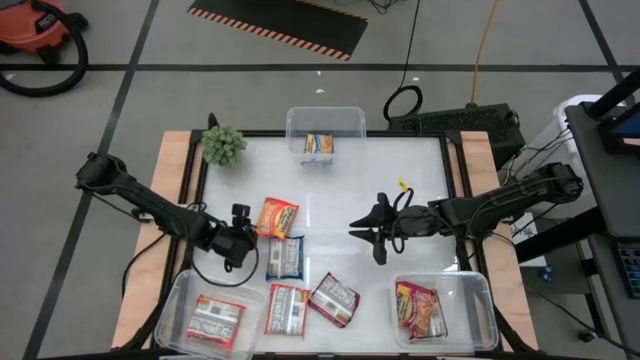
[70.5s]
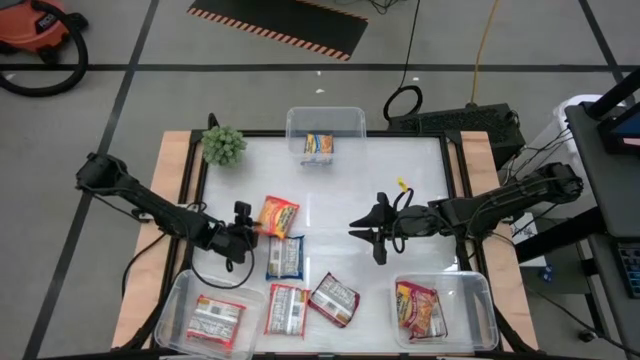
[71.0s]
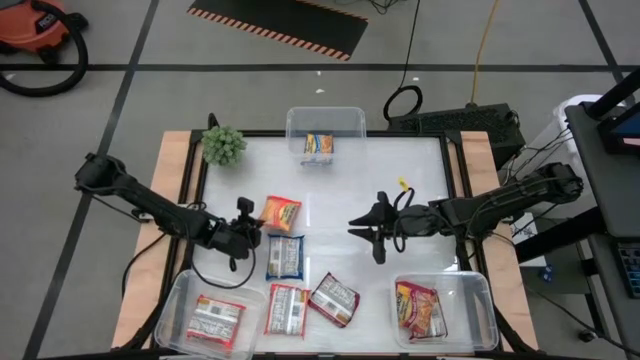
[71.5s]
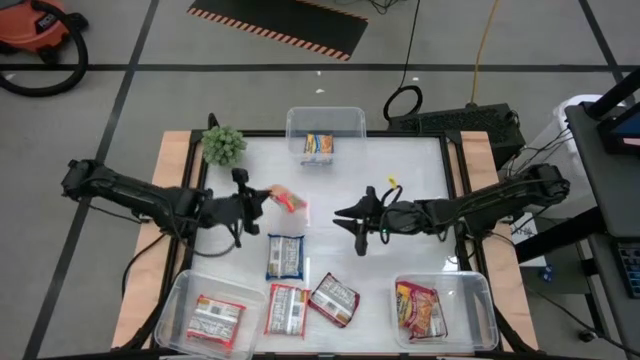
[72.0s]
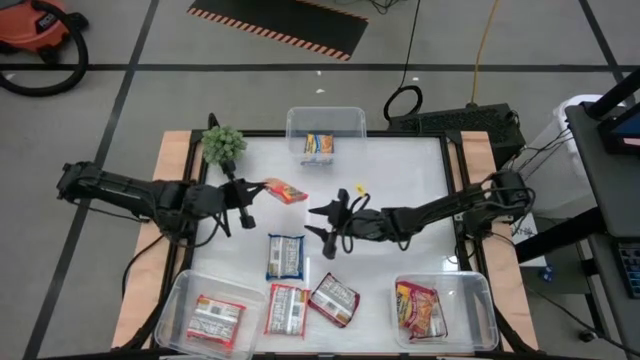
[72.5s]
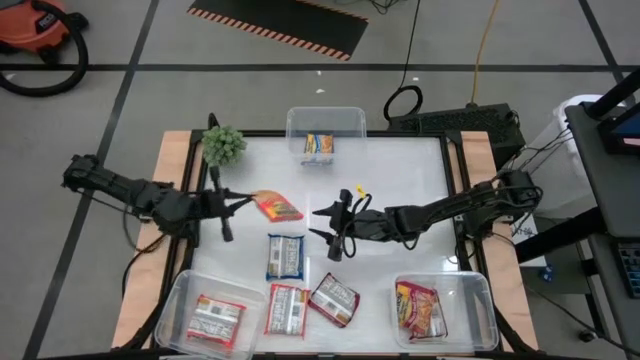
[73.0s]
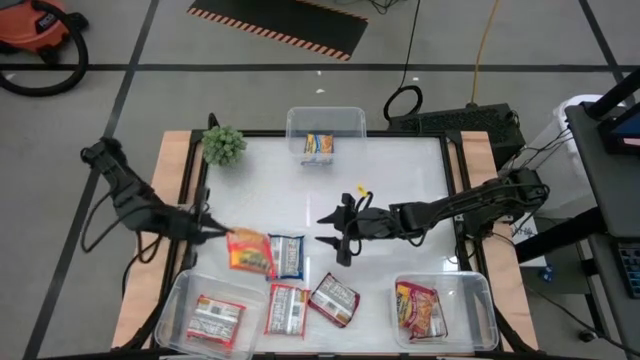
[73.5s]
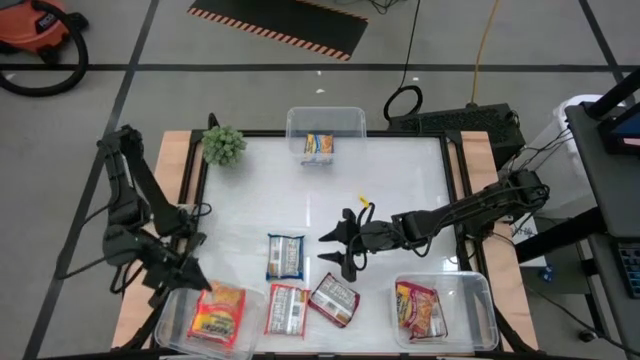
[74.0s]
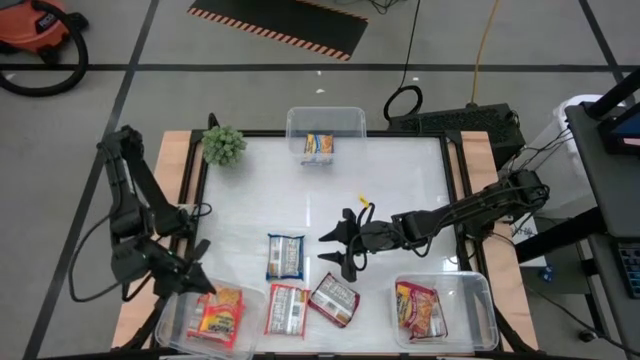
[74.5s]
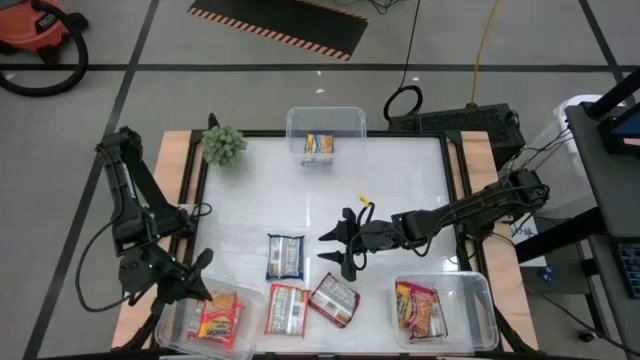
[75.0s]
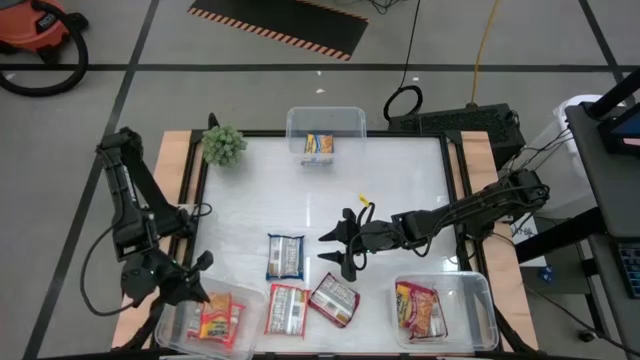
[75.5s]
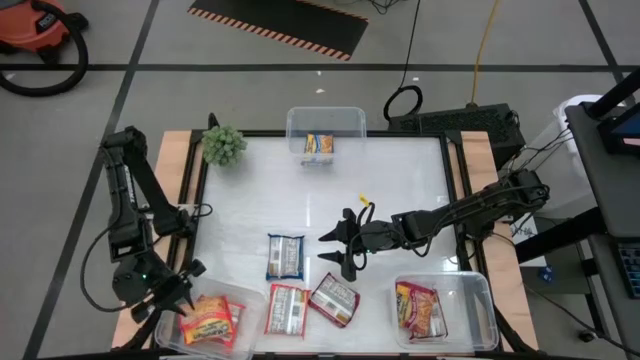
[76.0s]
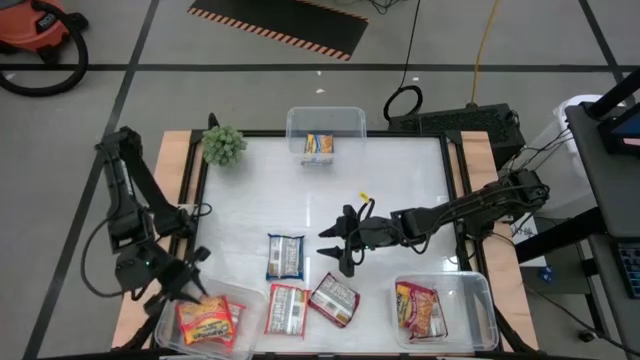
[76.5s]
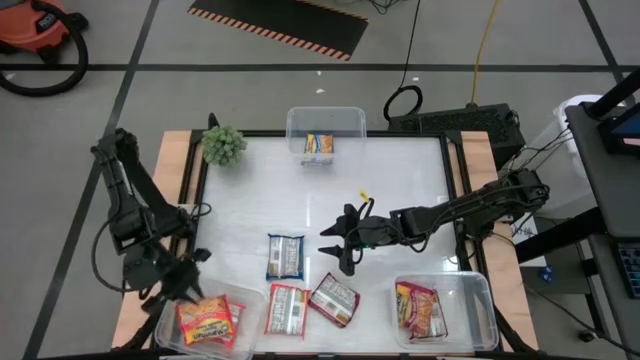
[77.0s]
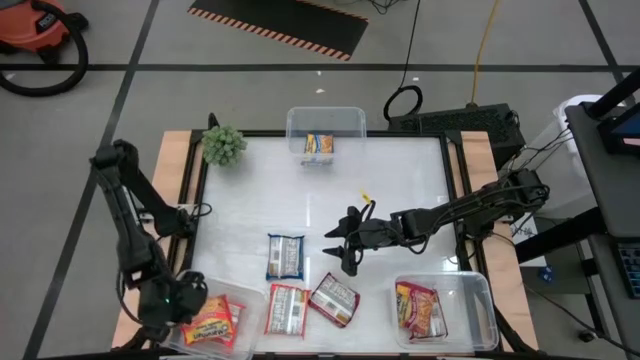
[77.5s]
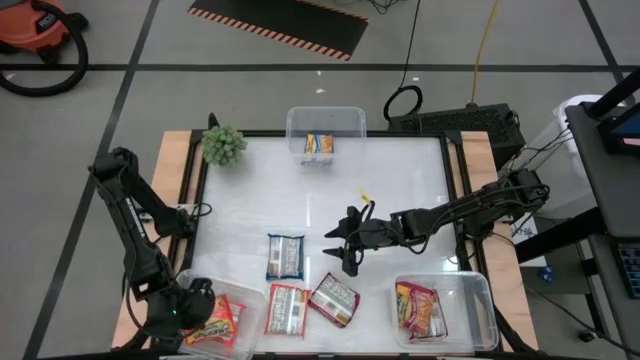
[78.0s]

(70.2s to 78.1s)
Task: Sort Maruchan noodles
Put the top orange noodle pack into the left transparent bin

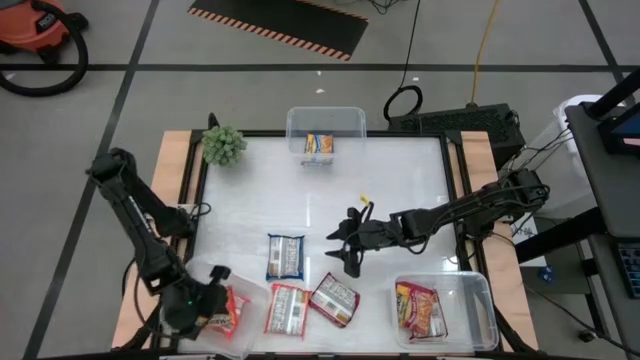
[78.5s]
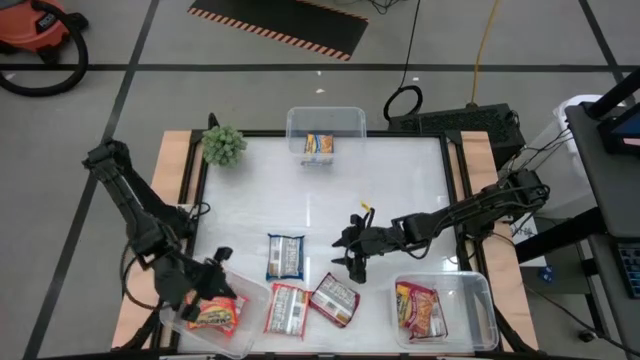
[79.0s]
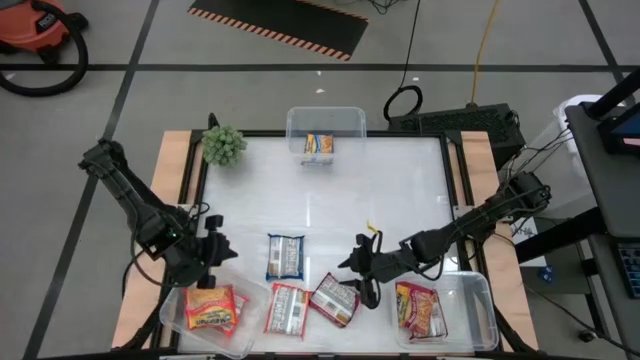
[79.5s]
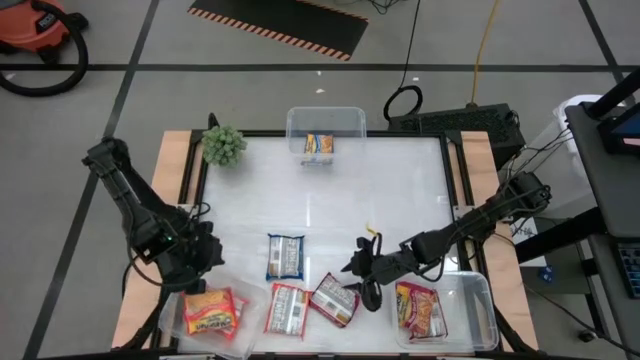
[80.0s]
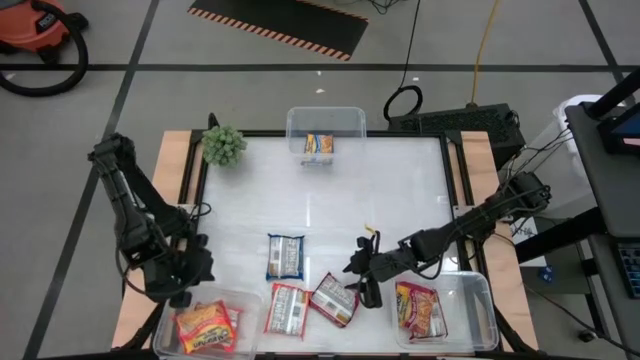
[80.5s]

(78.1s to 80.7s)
Adjust the left transparent bin

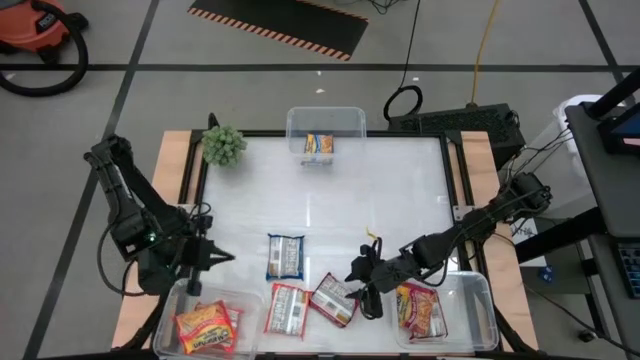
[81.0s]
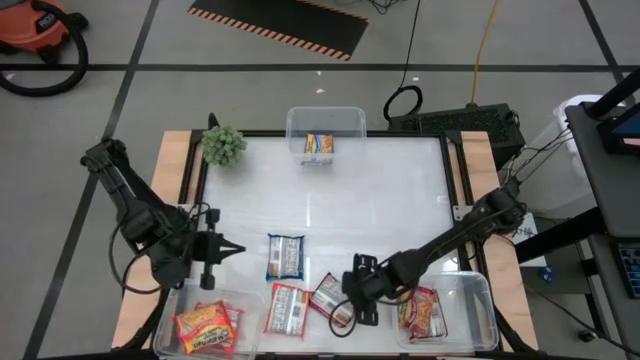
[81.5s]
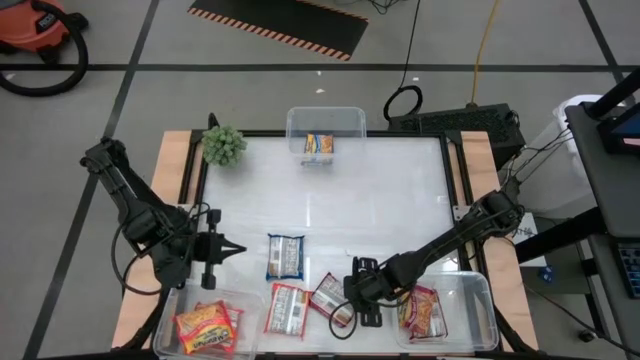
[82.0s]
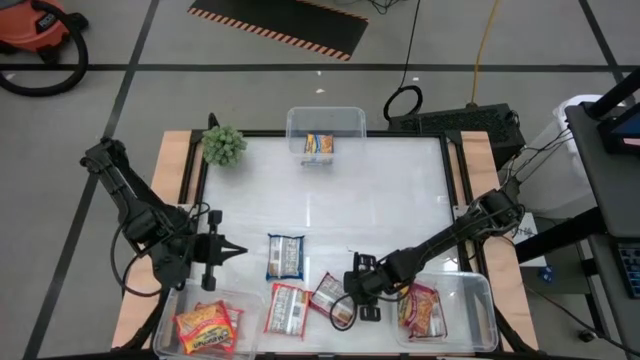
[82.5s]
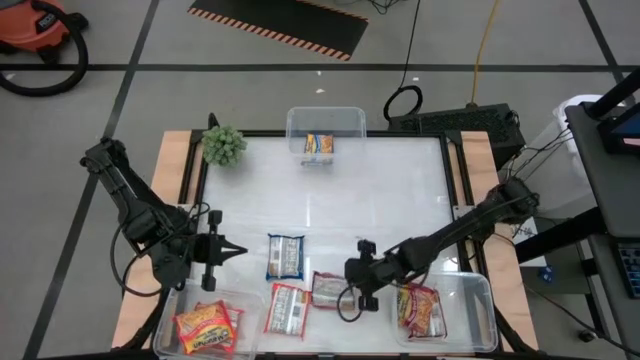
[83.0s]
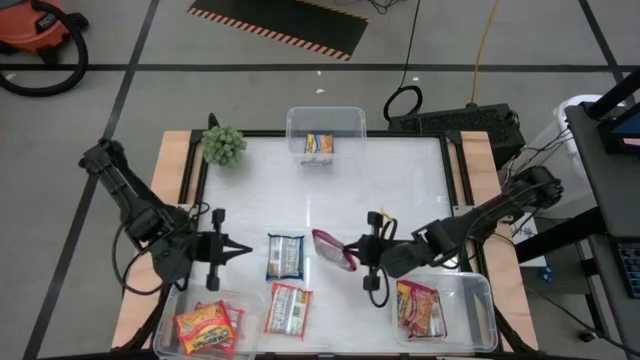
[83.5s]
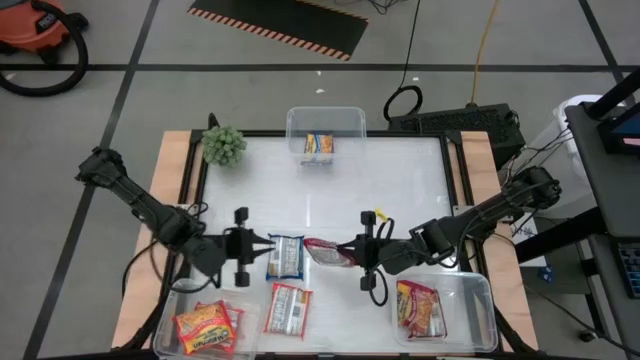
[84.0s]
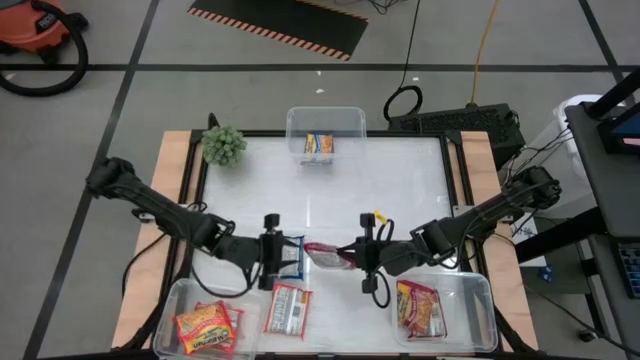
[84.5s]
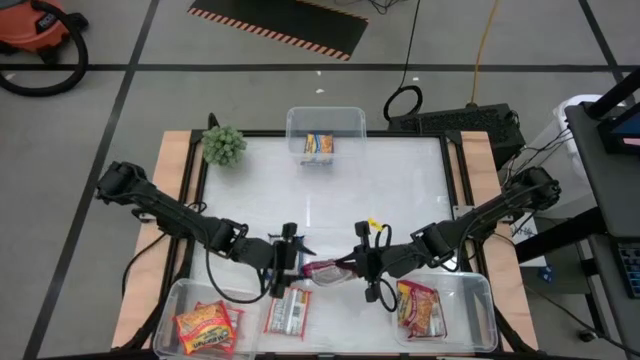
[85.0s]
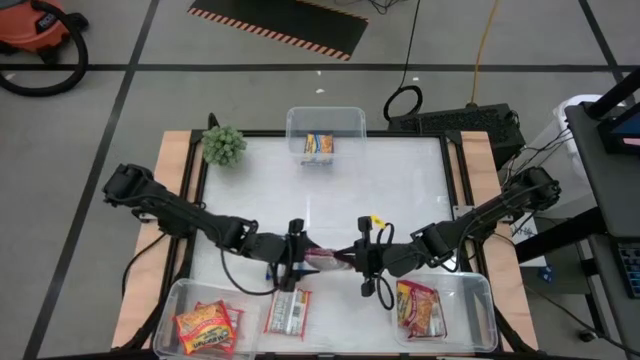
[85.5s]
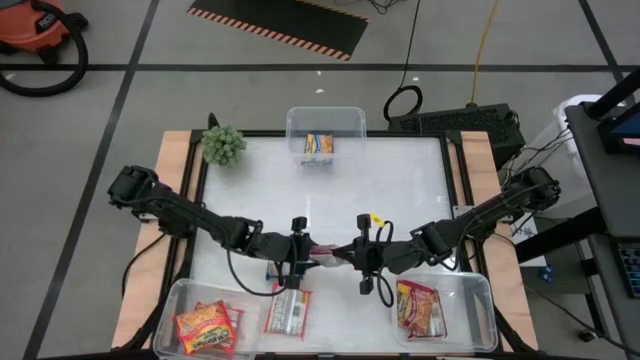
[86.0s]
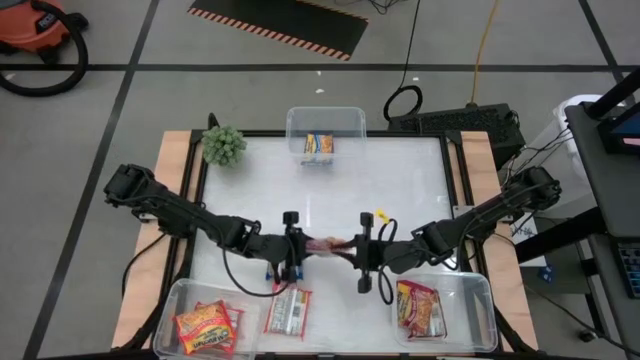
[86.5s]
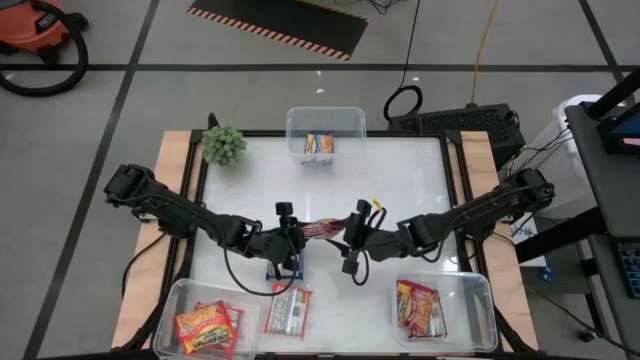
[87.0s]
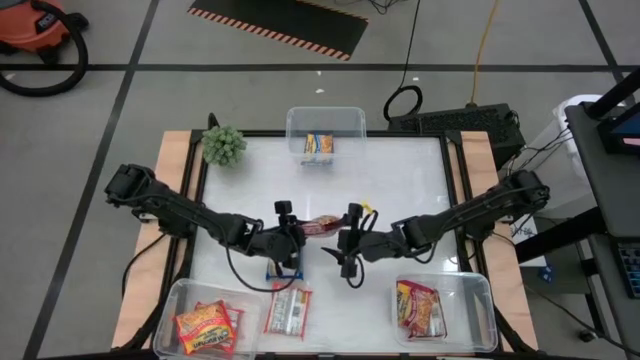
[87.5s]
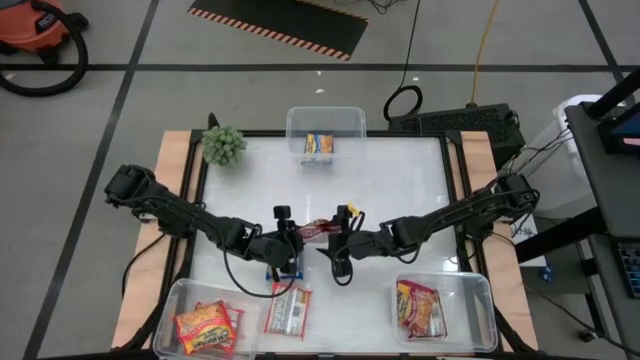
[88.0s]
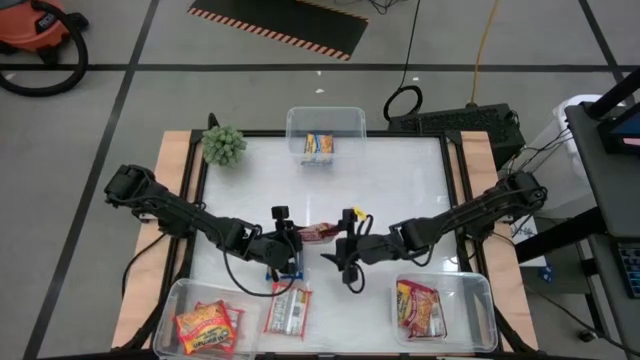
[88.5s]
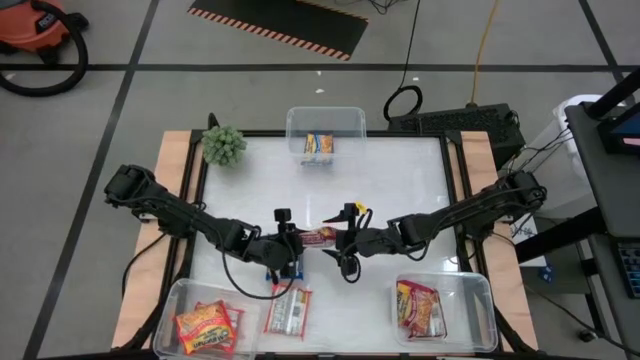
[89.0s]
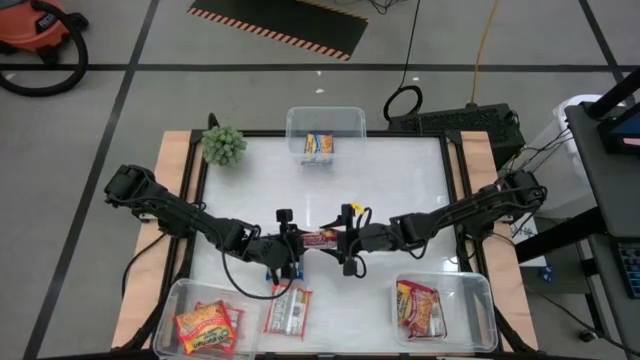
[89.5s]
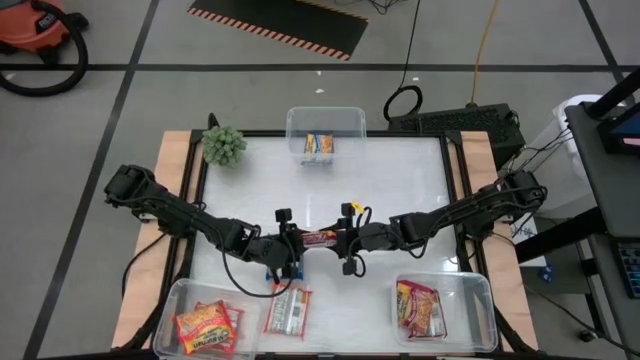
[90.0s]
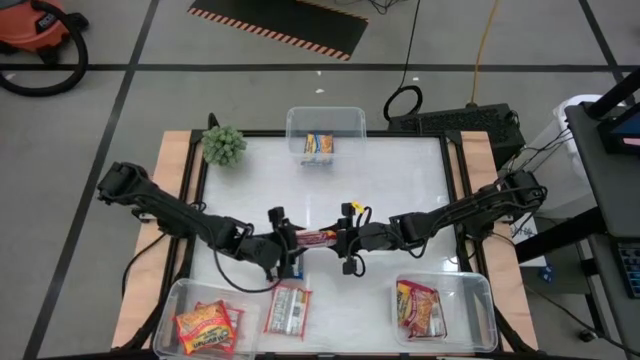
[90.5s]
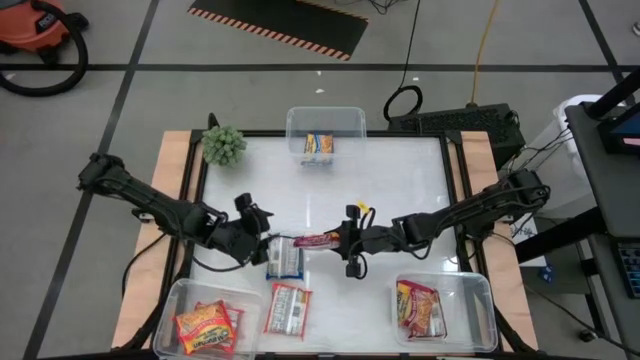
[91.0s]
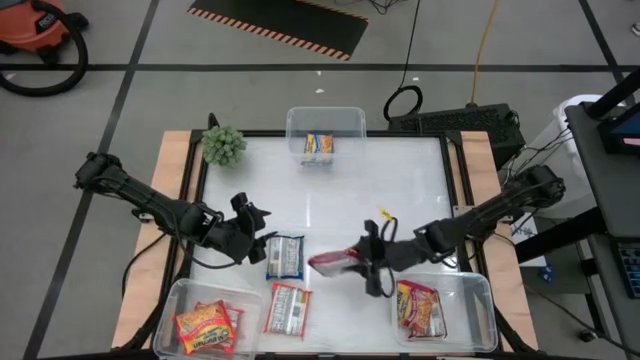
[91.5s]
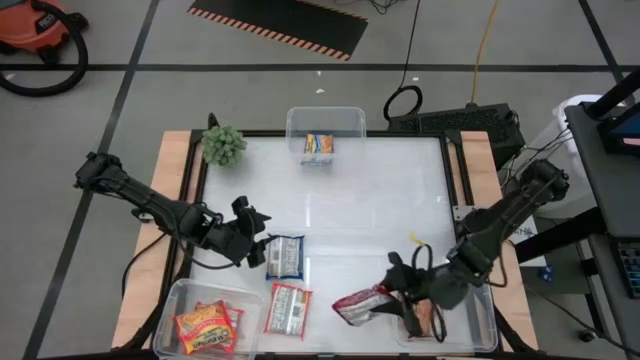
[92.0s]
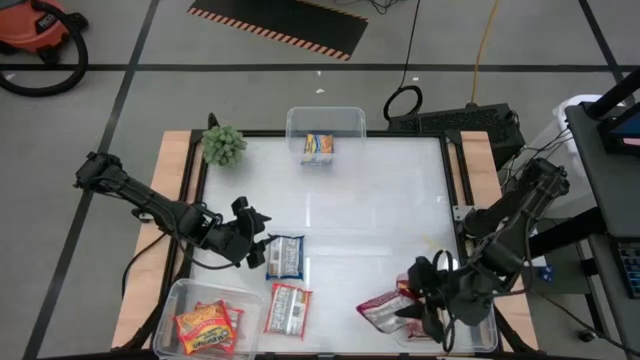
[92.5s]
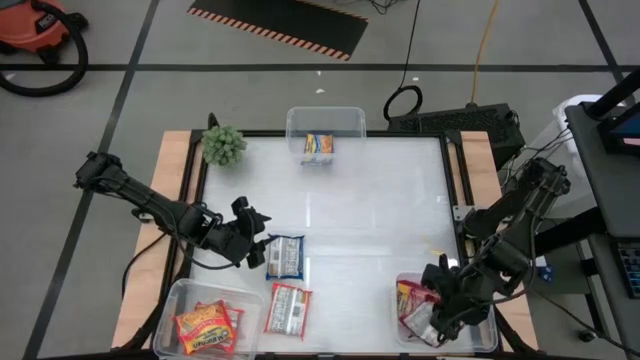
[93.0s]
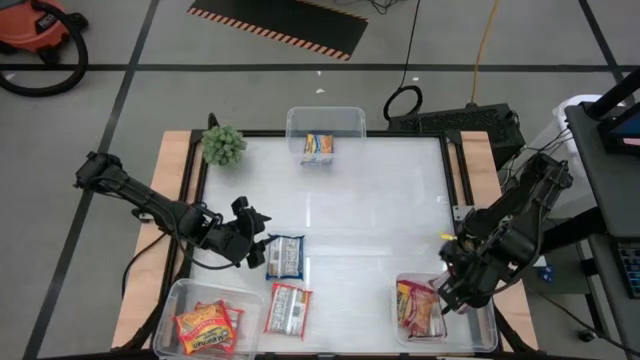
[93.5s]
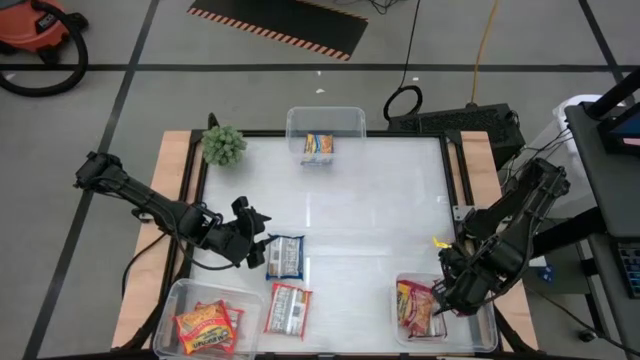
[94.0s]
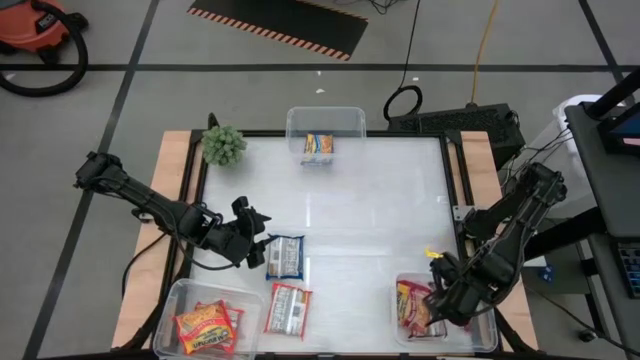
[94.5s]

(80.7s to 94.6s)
Put the red noodle pack into the right transparent bin
